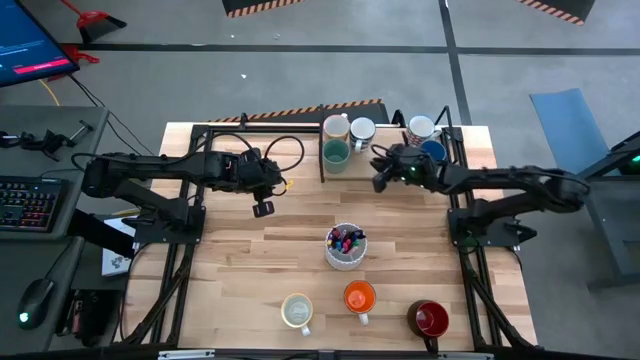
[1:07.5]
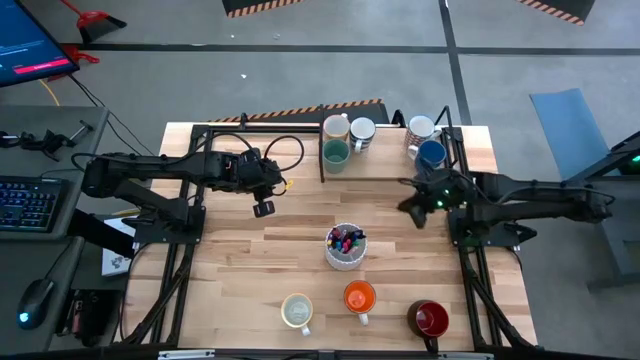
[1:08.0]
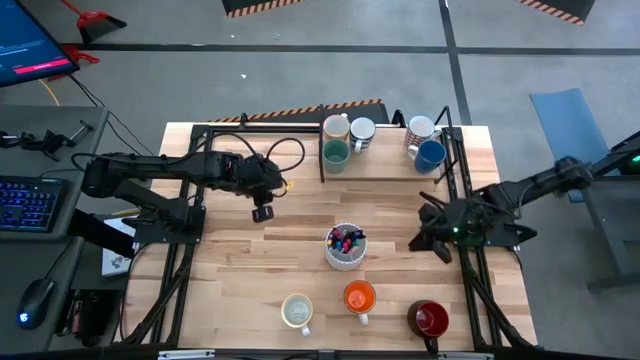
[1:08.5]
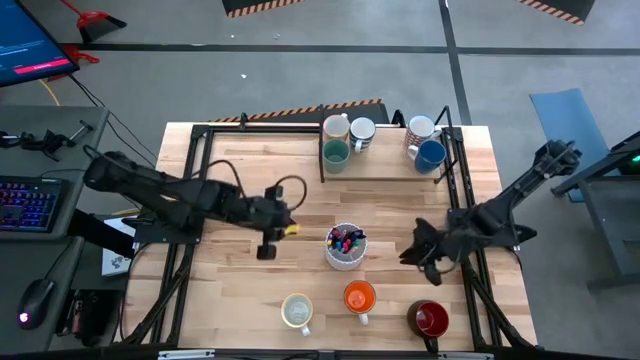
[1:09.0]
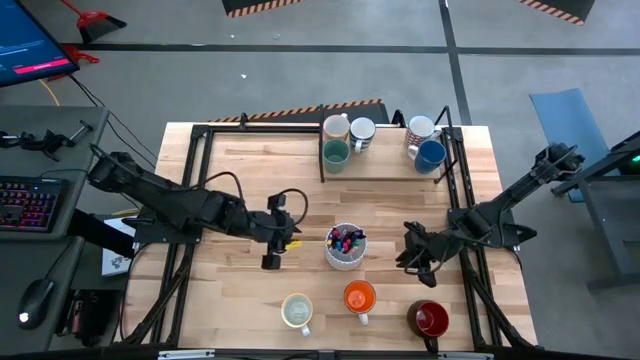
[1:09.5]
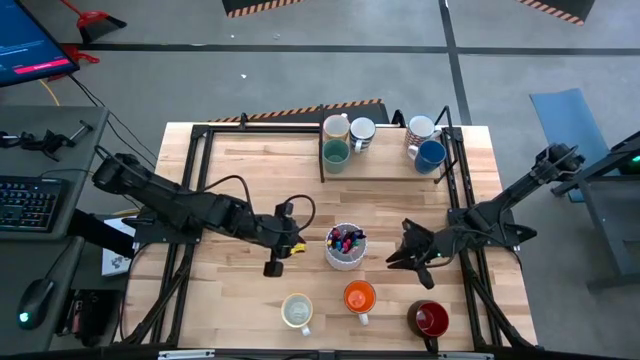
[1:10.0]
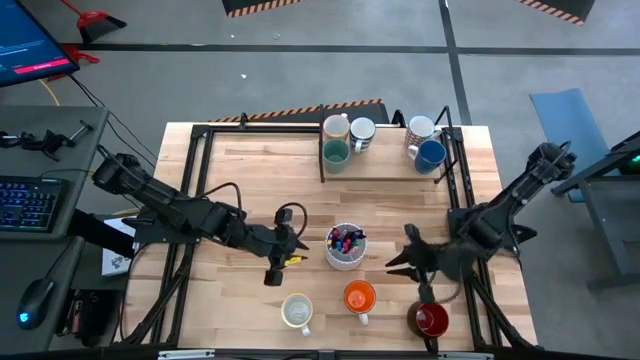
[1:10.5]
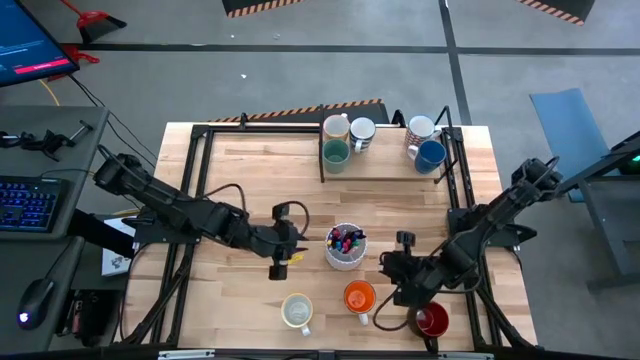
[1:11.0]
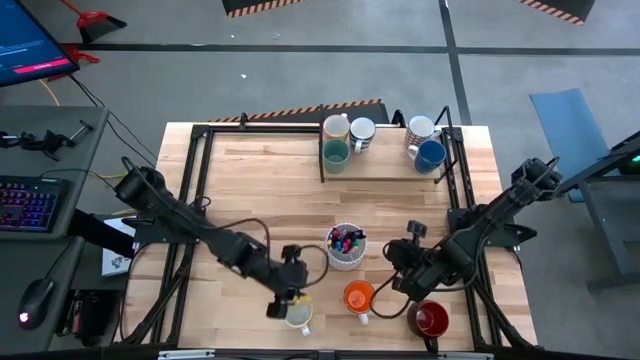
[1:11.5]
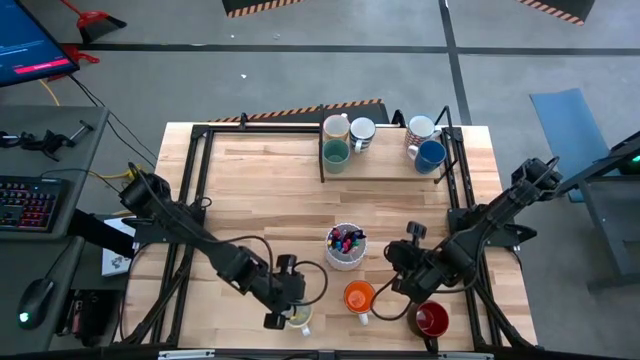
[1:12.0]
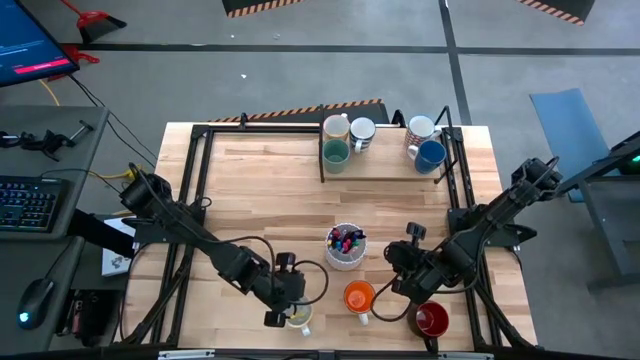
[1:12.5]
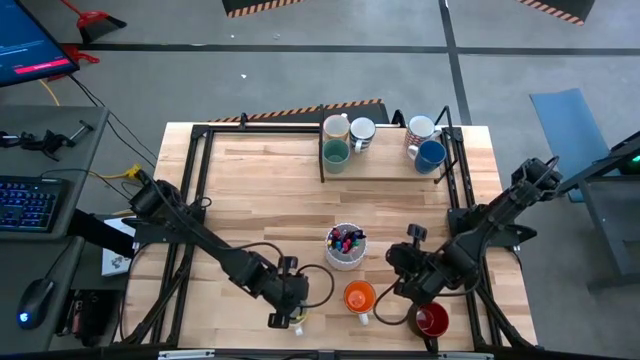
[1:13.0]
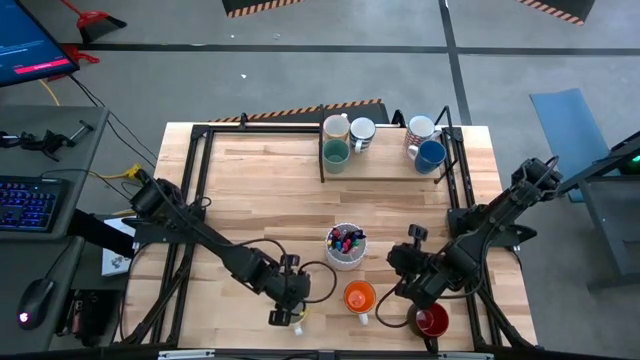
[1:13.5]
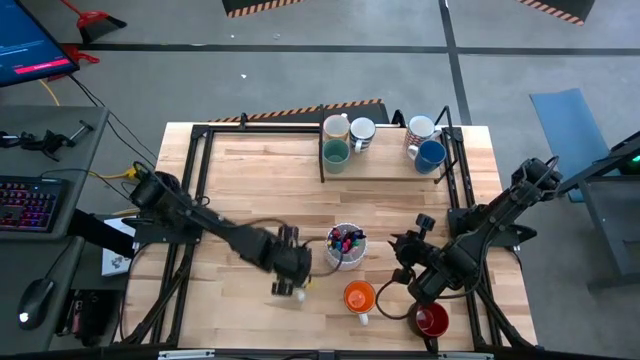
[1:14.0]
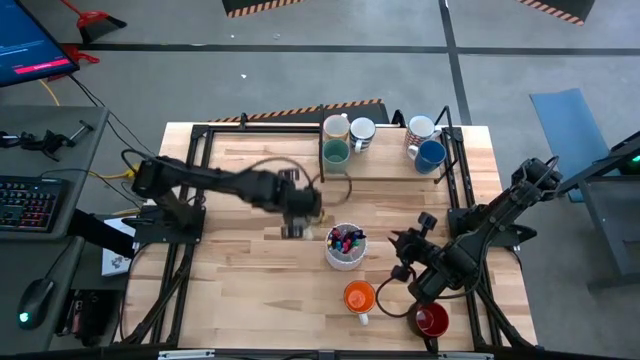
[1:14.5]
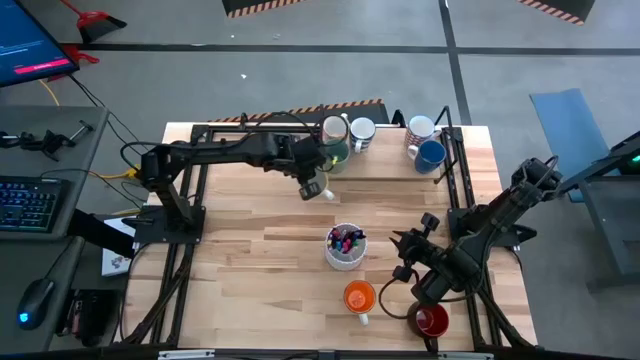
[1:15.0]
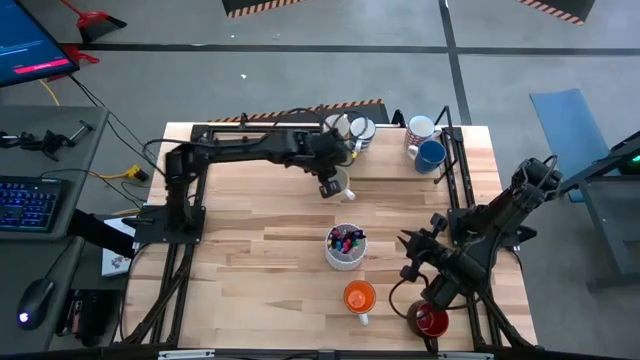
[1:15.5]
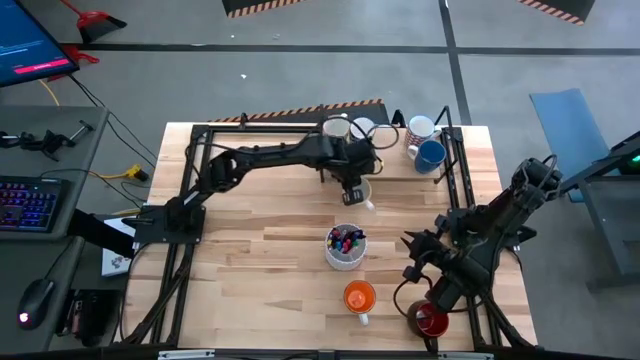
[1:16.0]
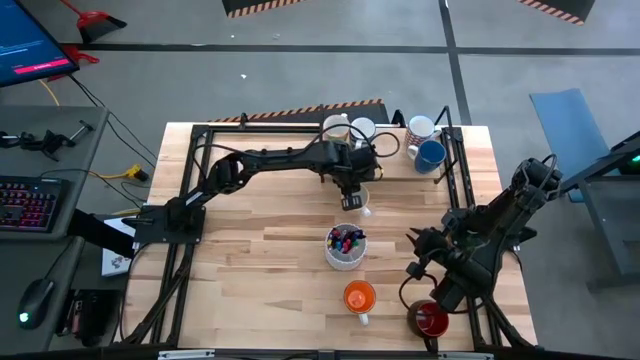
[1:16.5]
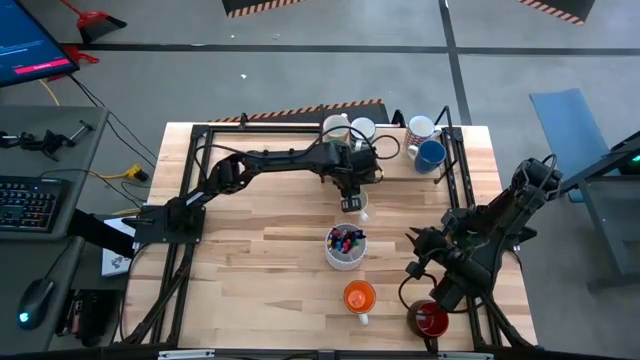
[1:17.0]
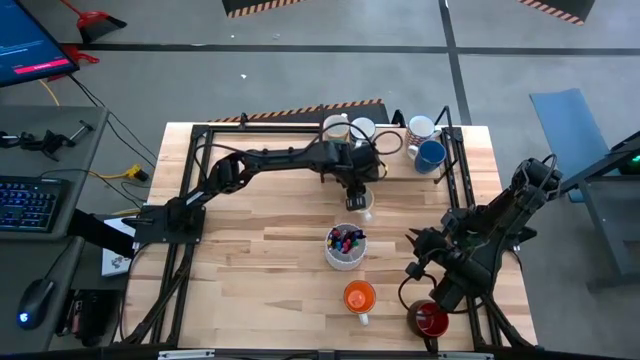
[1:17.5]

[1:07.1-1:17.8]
Task: Place coffee mugs
Move the orange patterned mug to the top of the table

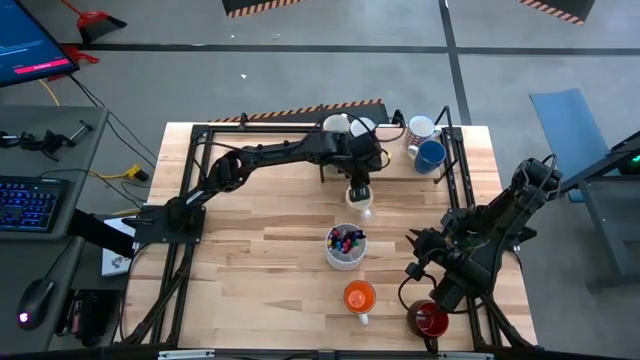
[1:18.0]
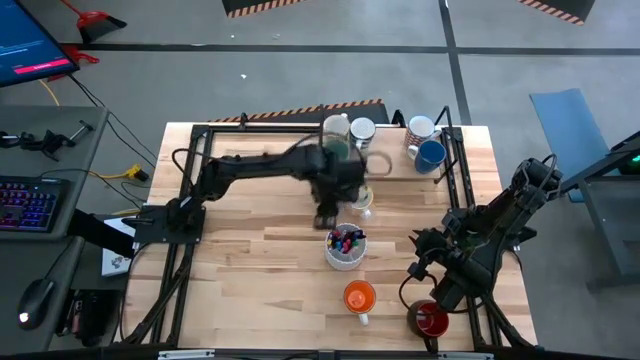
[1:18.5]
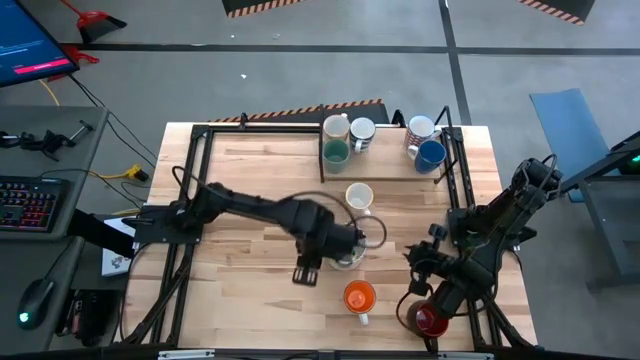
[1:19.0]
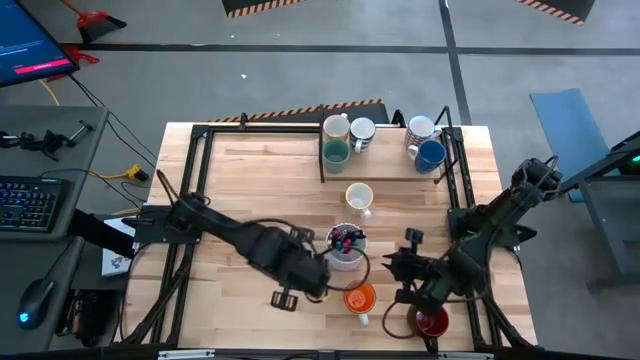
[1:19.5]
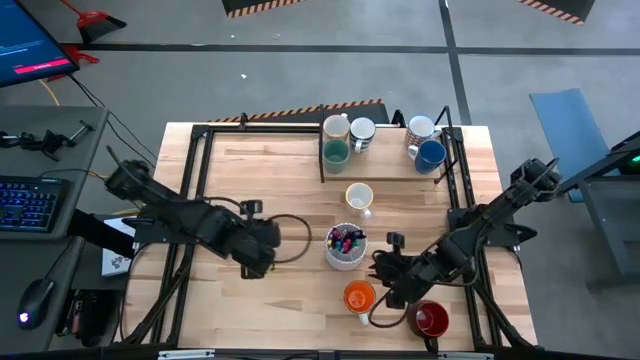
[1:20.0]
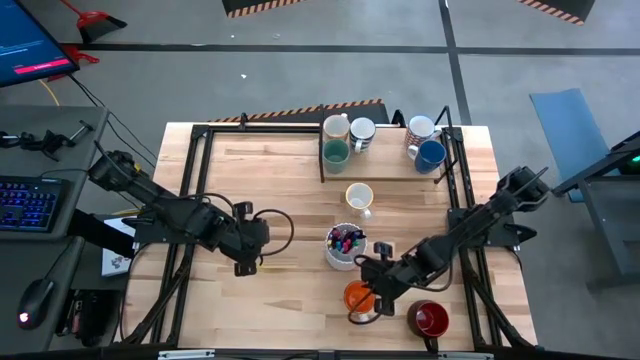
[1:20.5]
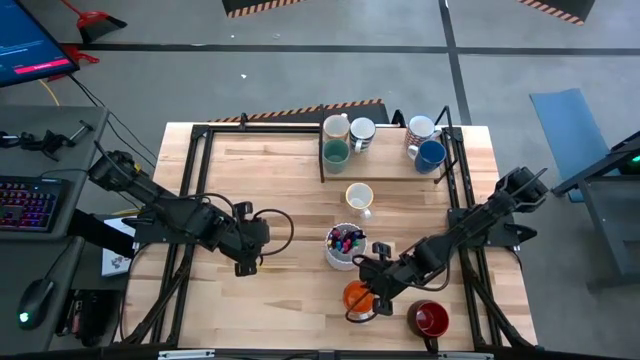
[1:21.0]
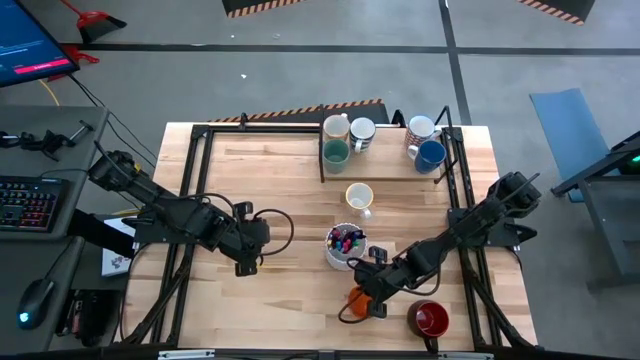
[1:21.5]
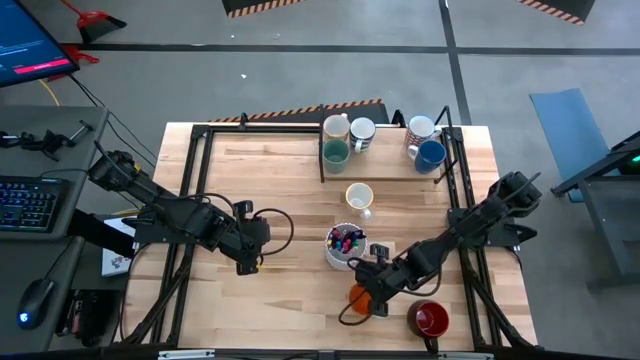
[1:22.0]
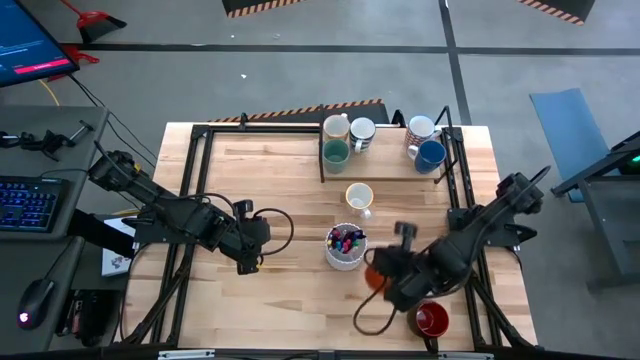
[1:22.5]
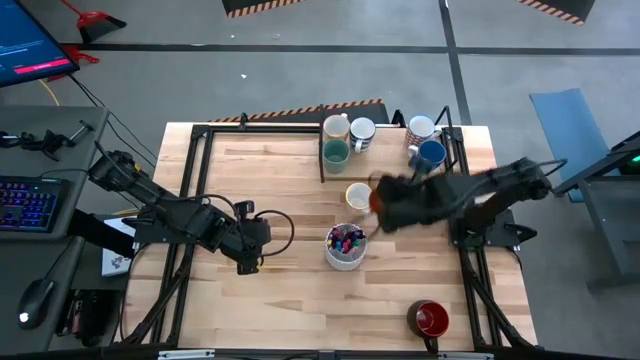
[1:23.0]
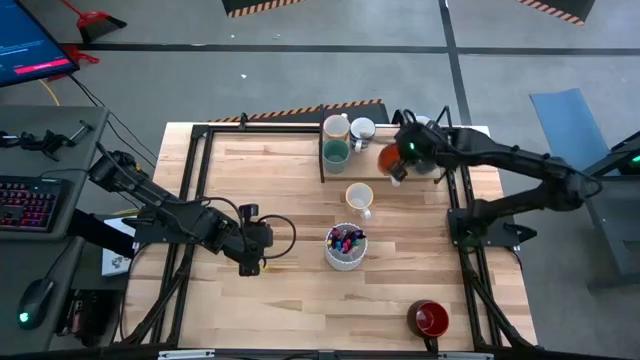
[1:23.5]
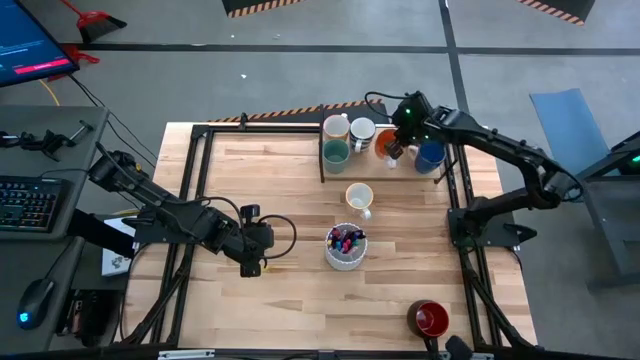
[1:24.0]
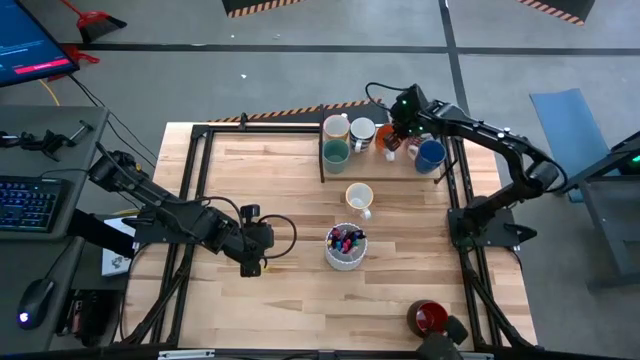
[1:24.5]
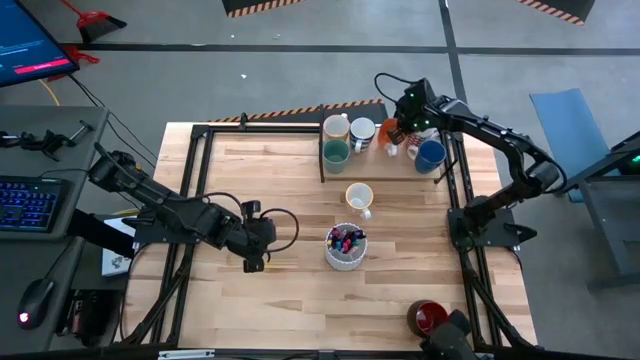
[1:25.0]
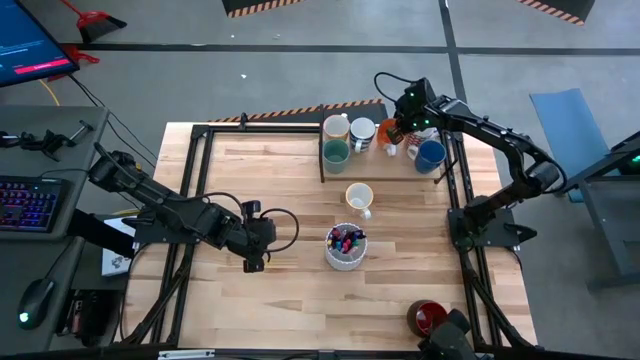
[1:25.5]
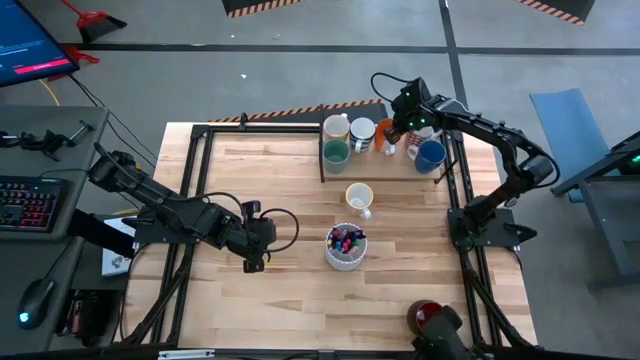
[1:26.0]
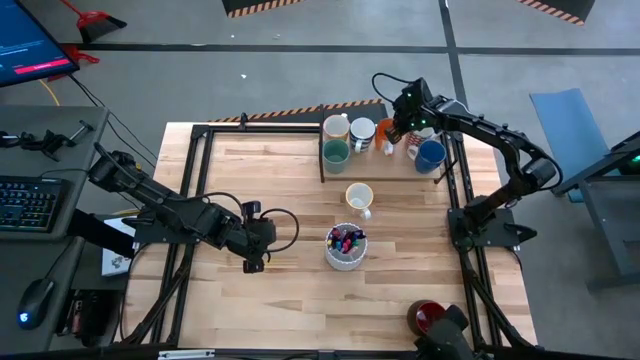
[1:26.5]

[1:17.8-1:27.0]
Put the orange mug on the shelf

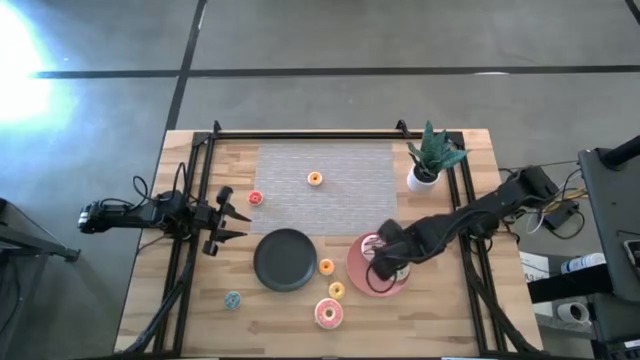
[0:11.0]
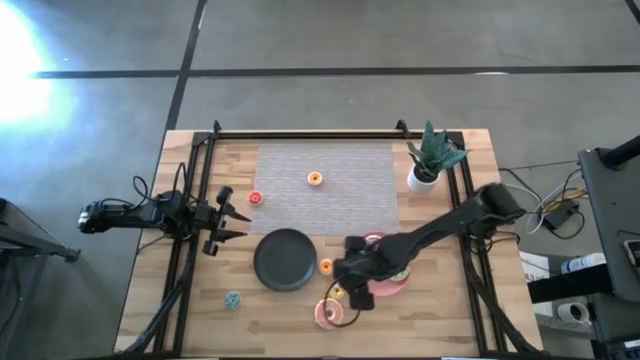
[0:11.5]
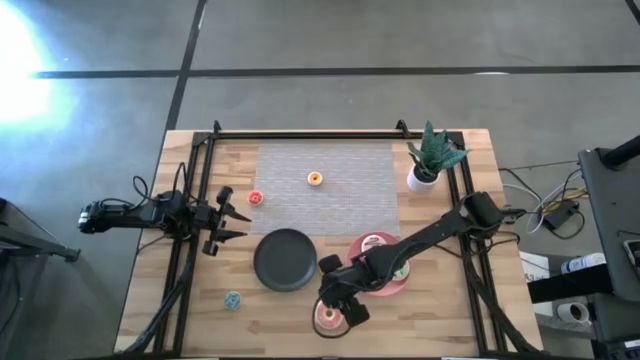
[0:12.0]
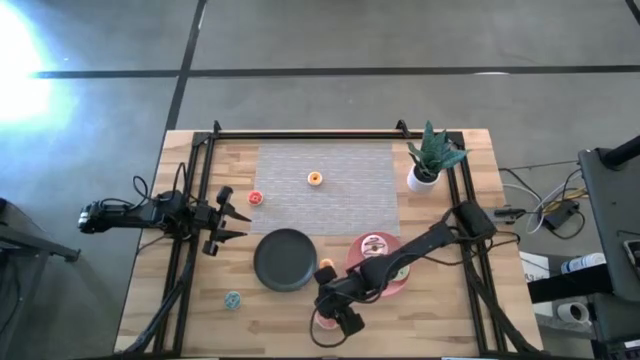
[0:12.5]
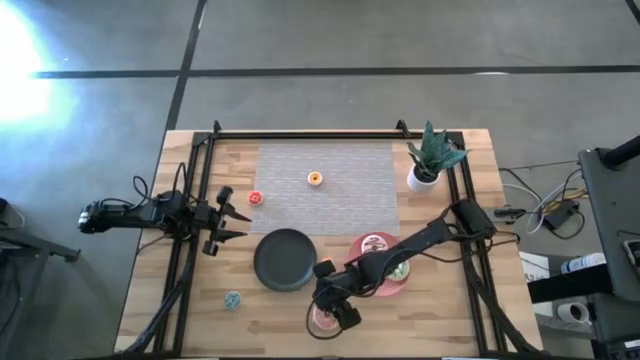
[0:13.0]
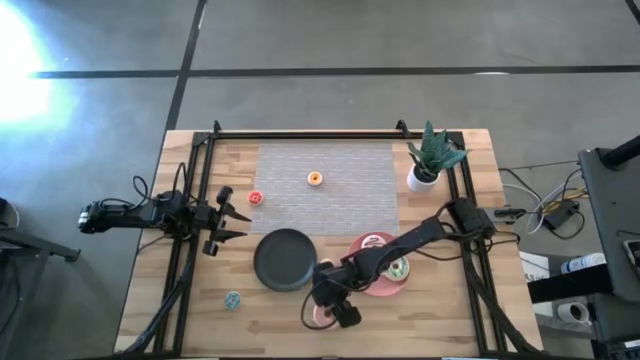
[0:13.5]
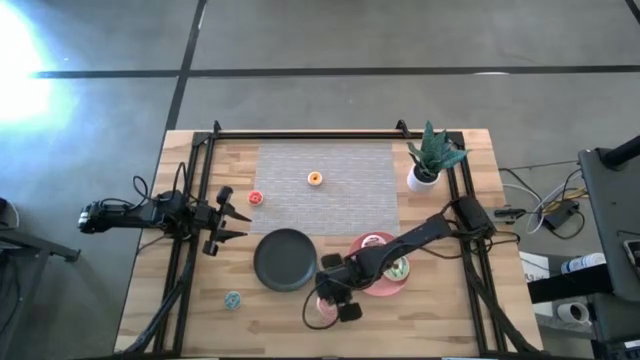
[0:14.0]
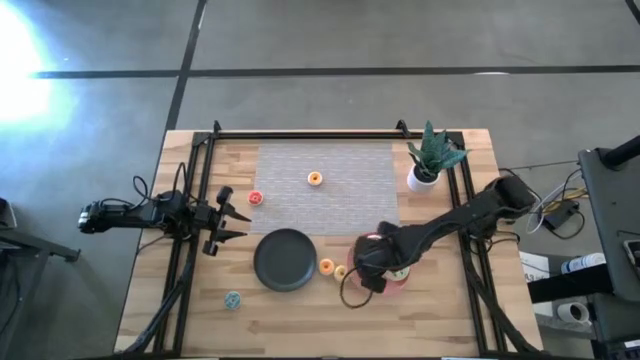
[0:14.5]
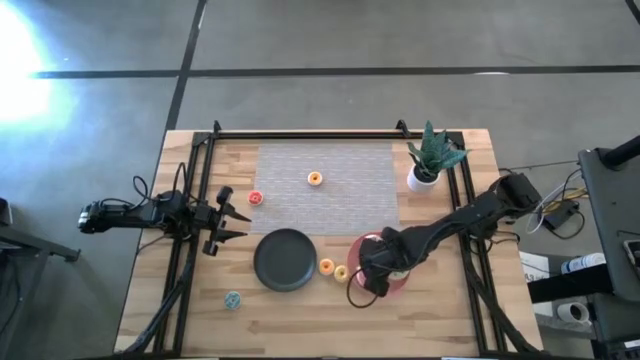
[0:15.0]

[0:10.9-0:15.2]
Task: Pick & Place donuts
Put the large pink donut on the pink plate
